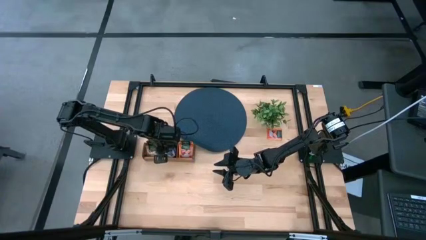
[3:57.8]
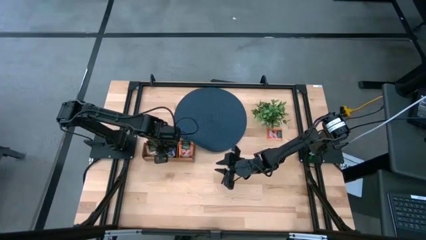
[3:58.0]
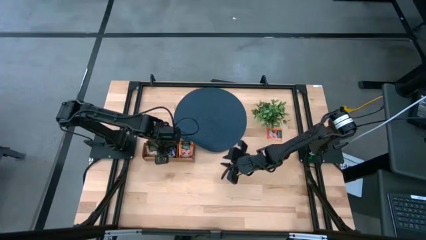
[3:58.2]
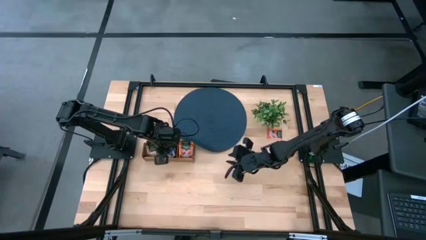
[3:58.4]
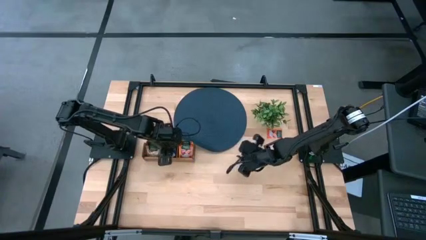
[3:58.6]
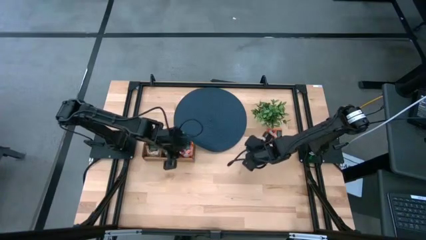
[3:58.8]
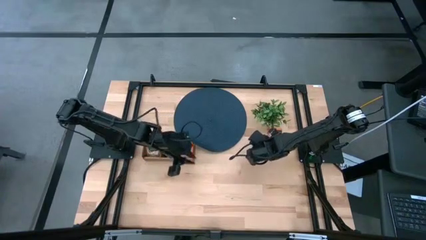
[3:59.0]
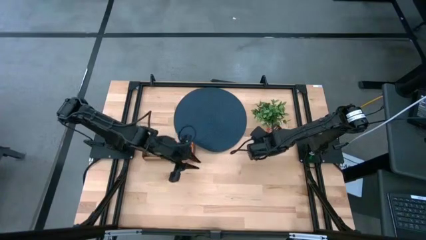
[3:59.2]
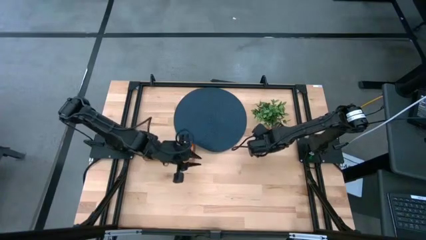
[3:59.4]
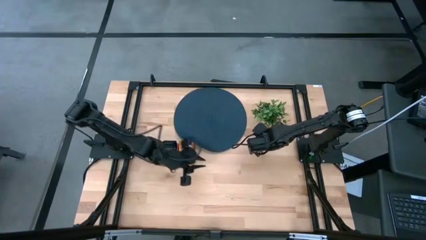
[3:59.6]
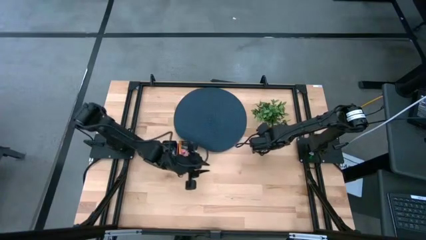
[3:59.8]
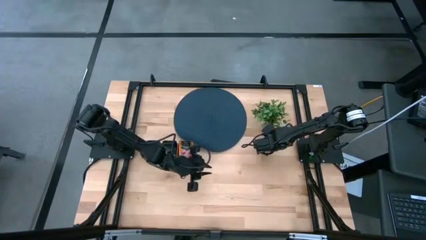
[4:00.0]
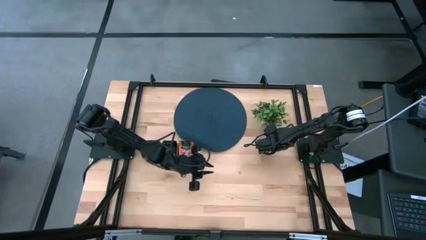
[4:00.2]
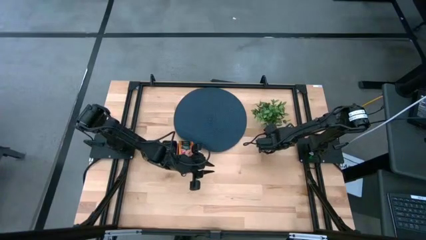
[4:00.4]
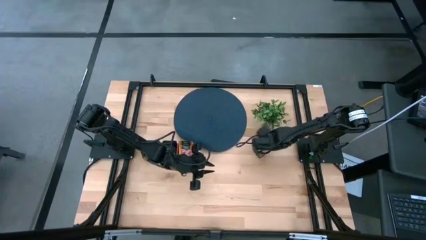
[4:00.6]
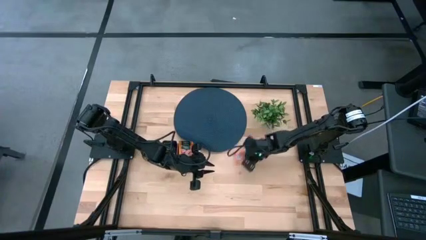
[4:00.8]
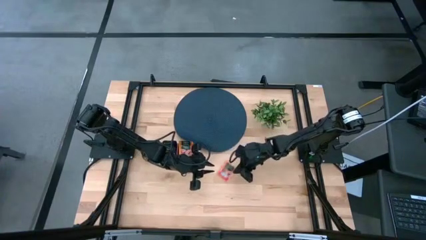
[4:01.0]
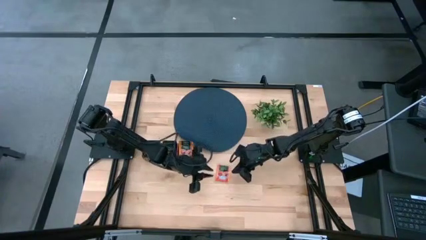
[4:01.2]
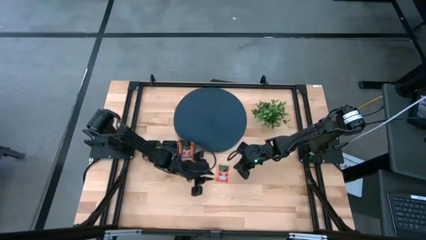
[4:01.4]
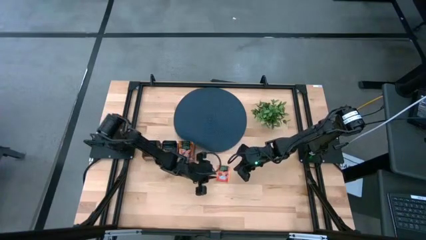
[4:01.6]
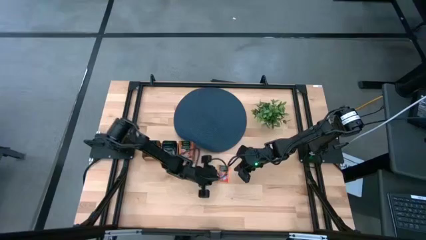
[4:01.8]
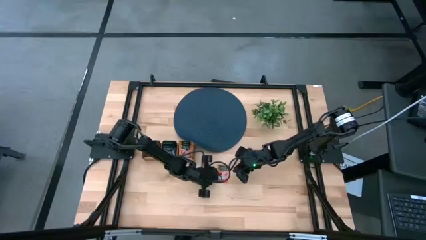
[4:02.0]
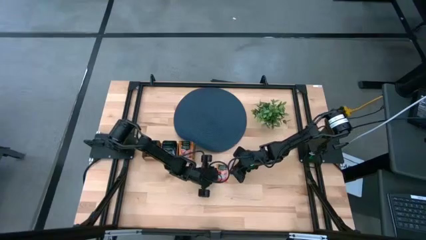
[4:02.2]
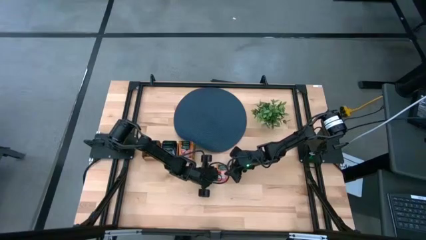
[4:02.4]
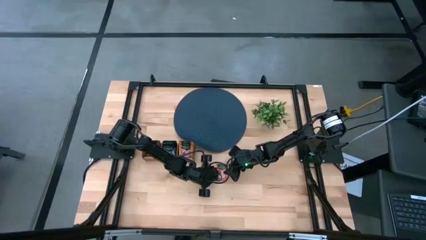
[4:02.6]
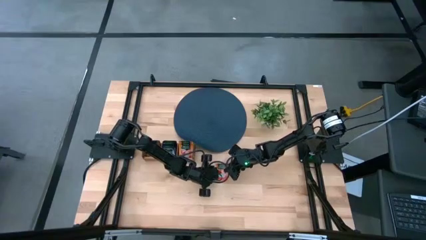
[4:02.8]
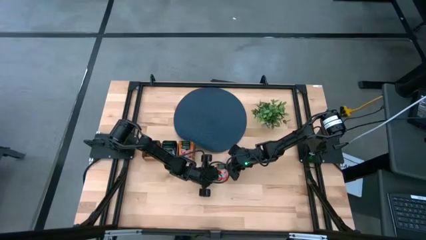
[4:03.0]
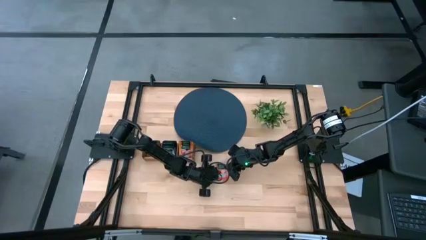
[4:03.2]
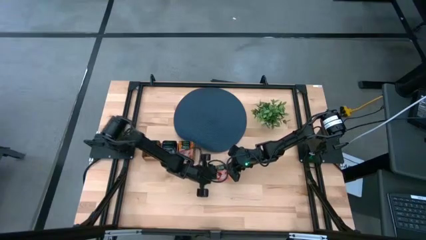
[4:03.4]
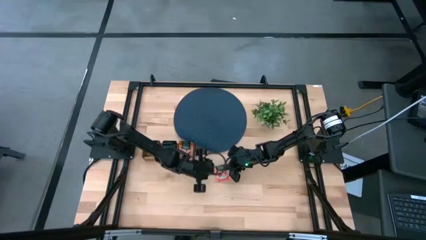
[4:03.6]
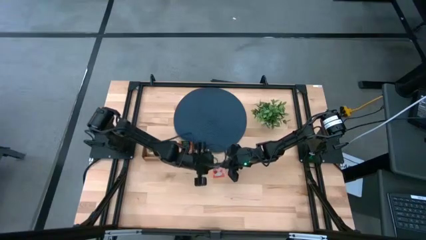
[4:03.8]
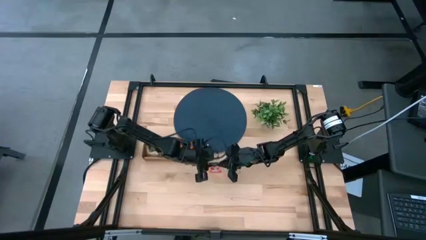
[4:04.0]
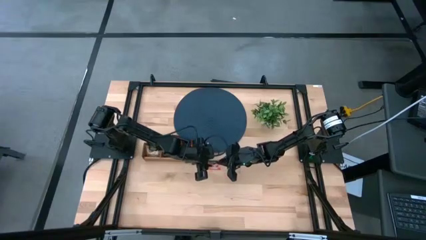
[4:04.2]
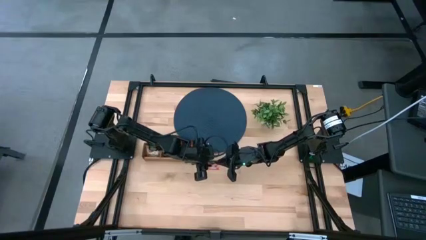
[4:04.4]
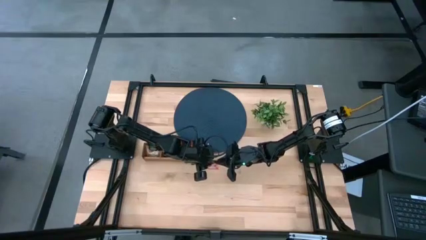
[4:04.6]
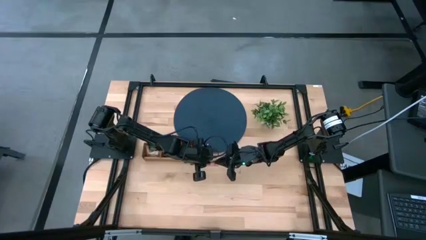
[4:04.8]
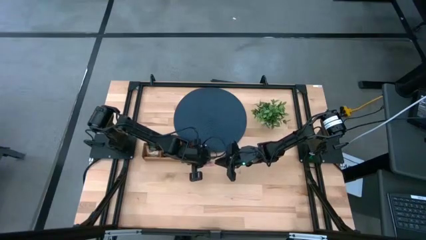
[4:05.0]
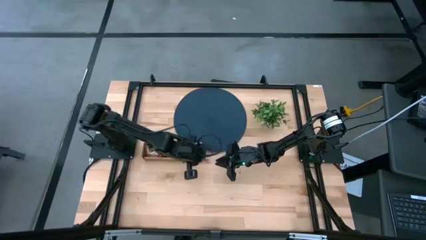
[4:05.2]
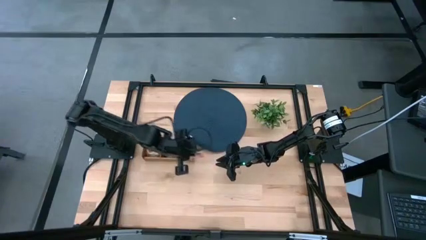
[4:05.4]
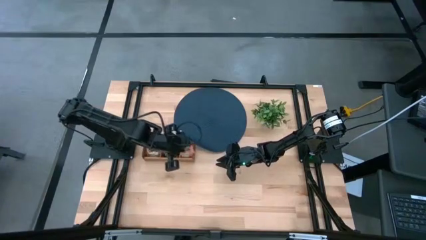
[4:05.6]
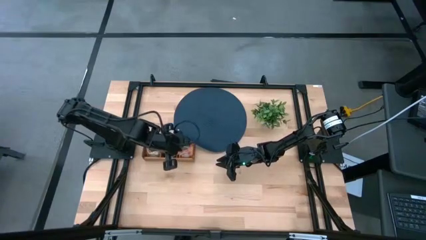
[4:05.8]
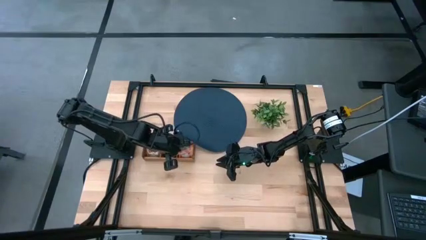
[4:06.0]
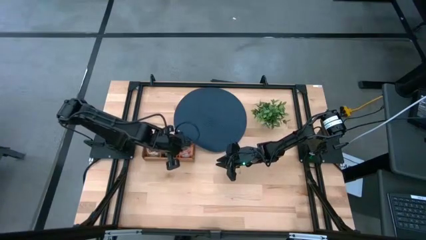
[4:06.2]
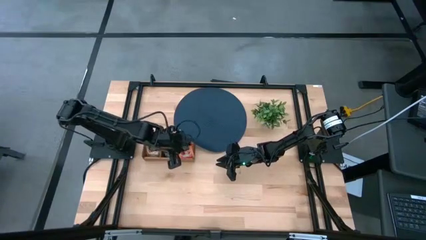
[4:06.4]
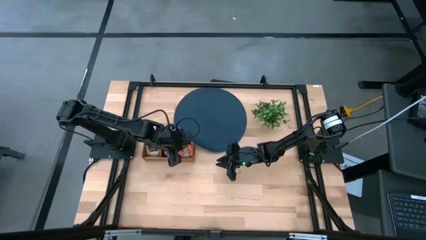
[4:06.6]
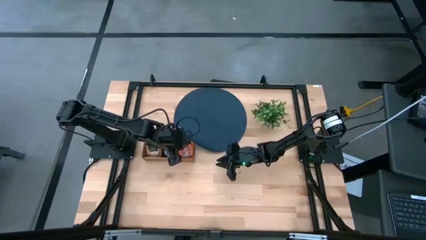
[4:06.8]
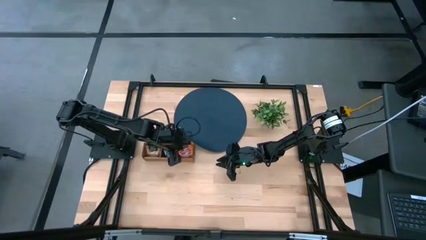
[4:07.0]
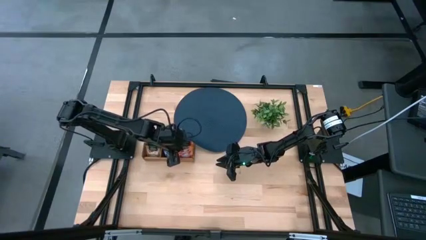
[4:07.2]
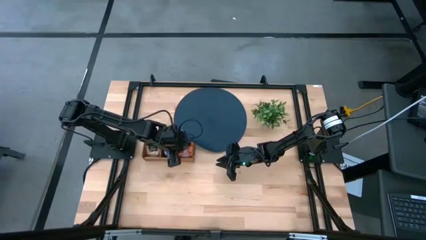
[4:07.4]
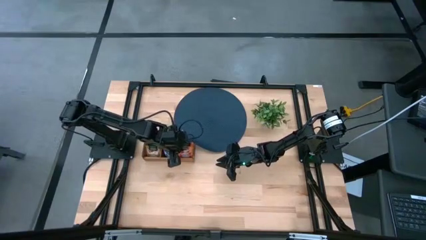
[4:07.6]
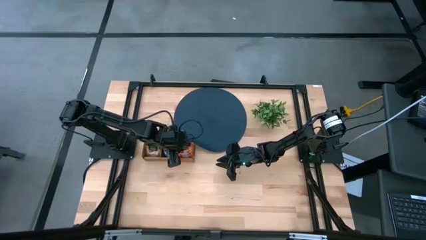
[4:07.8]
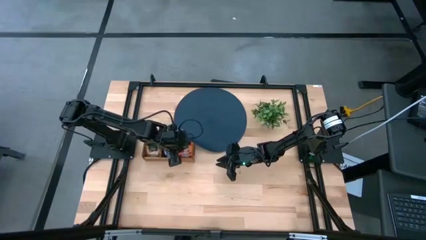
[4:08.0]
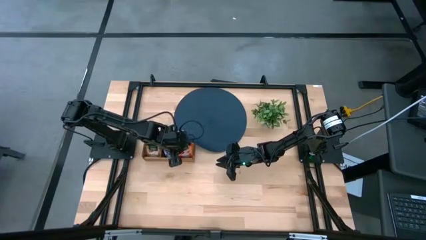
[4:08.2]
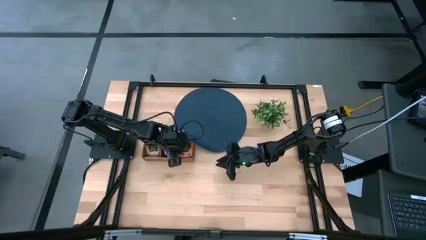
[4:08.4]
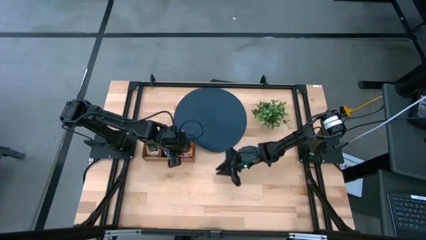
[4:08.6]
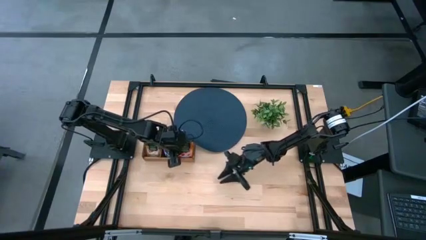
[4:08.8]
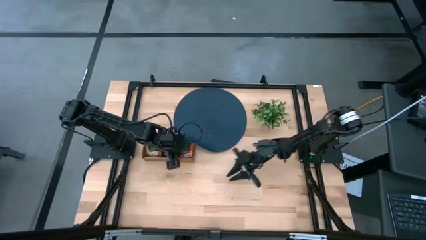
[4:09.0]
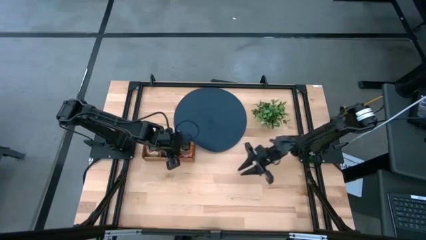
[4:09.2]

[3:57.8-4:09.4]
Task: Pick & Place Tea
Put the orange tea bag into the right section of the wooden organizer

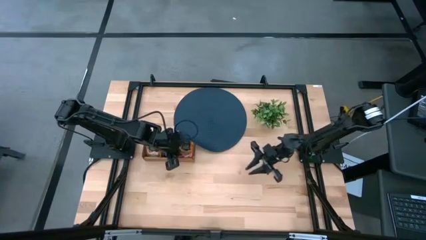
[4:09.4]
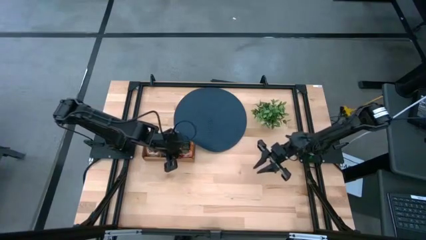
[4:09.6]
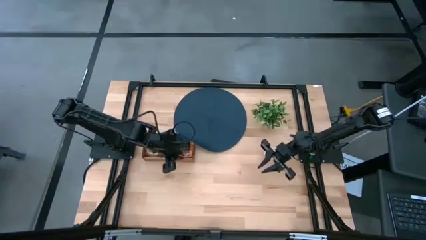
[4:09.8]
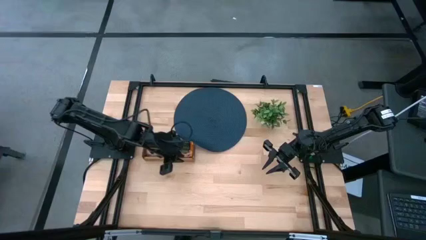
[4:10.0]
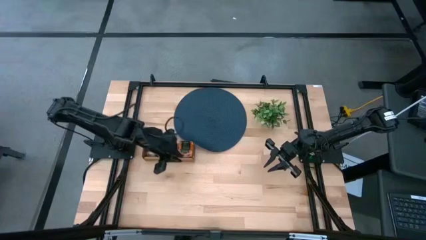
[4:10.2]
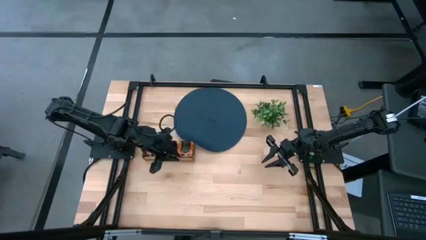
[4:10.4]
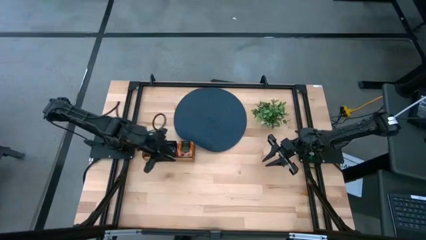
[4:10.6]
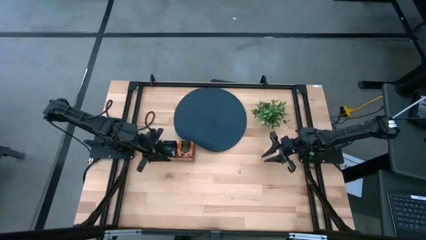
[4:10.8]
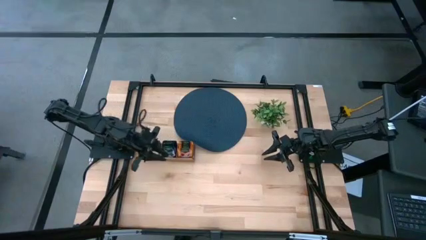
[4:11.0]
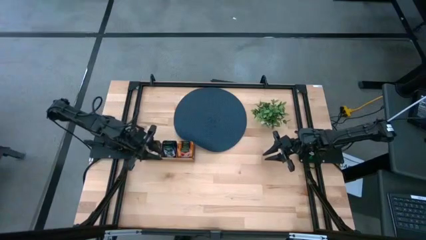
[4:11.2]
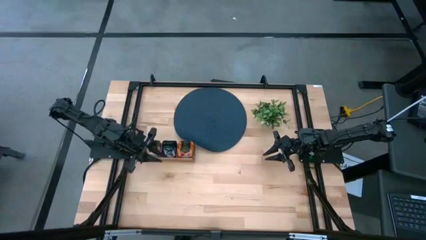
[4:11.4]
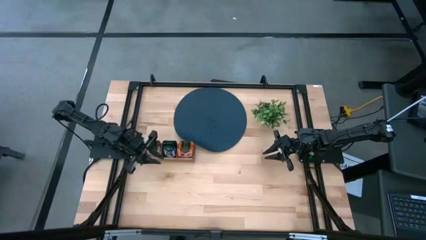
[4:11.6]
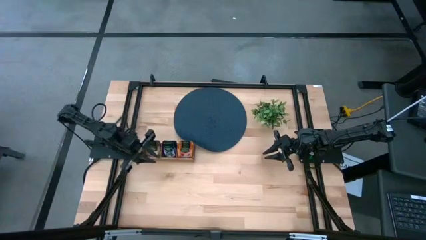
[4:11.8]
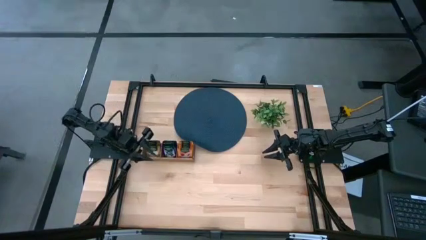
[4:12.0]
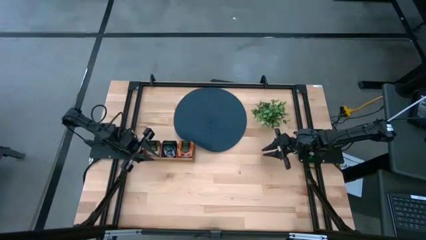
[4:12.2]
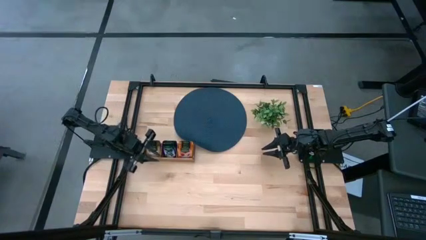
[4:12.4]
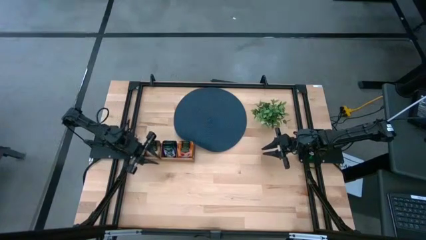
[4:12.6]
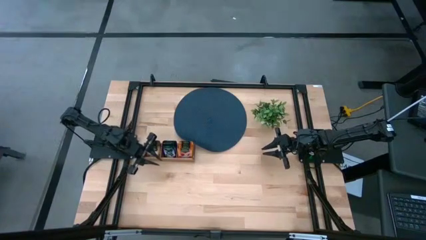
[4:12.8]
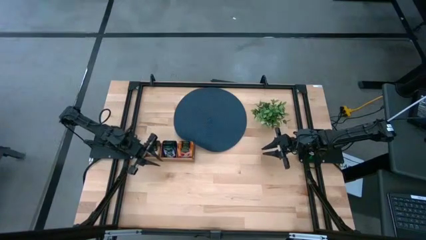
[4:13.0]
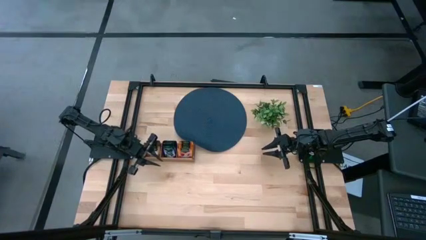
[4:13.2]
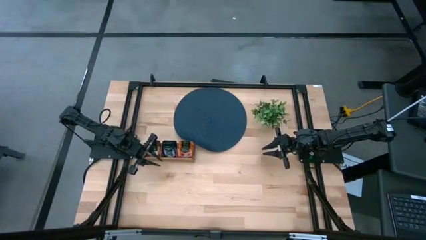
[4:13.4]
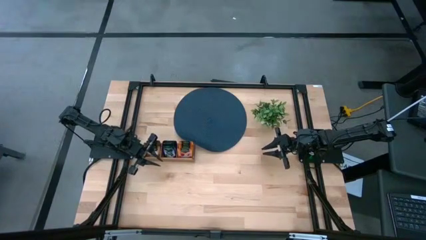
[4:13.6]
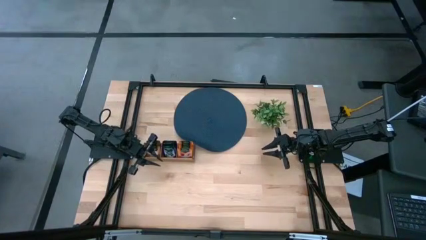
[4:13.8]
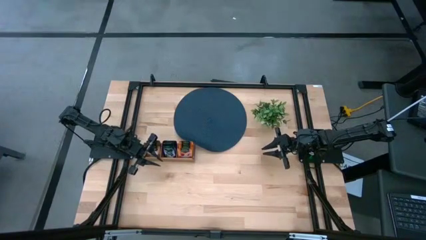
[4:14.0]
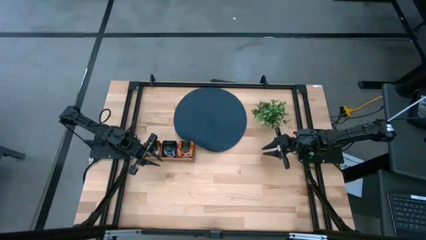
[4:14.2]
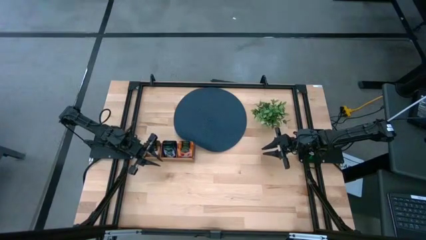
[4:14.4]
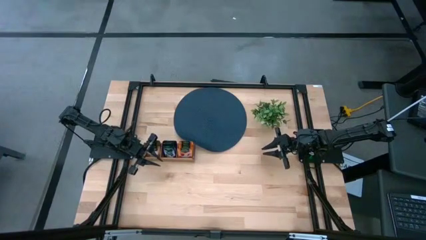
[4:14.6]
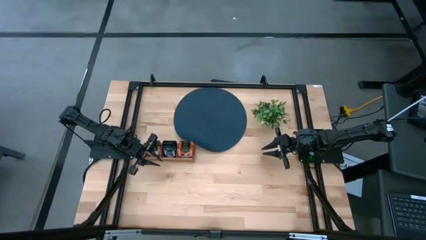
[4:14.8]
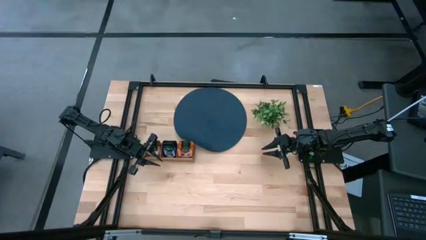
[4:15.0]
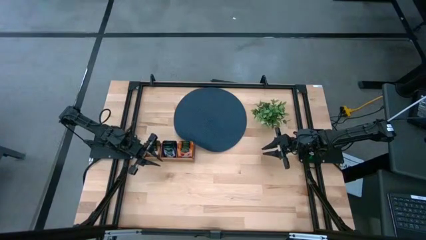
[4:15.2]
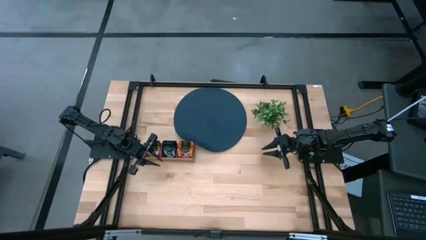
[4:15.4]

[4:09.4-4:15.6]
Return to Home Position
